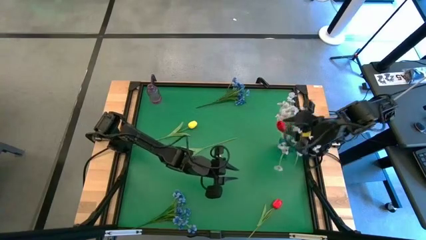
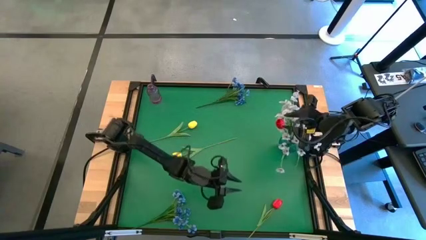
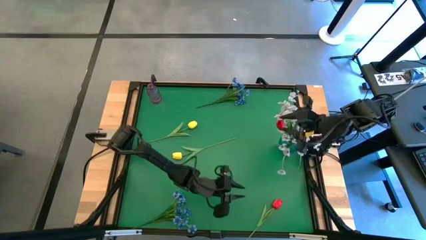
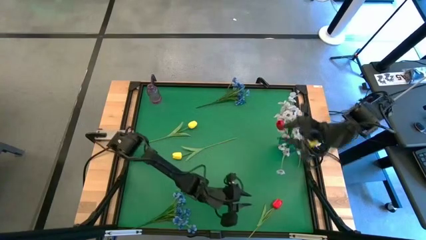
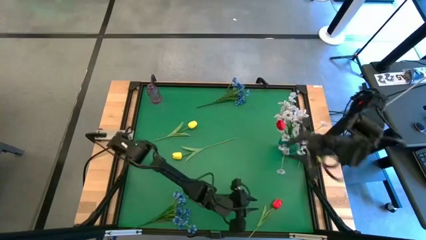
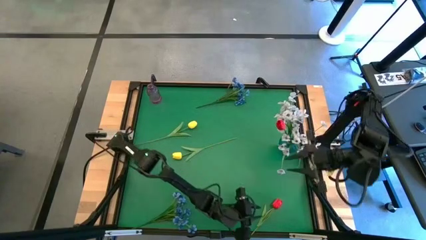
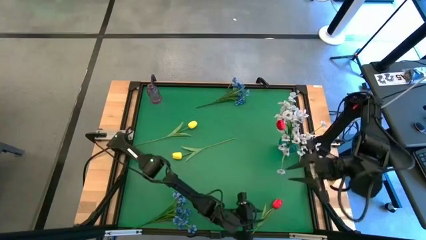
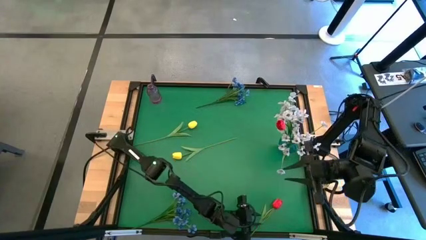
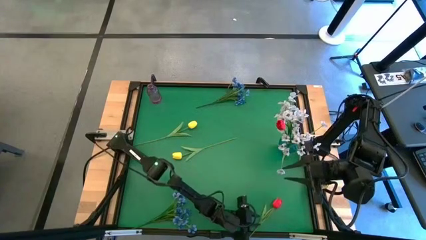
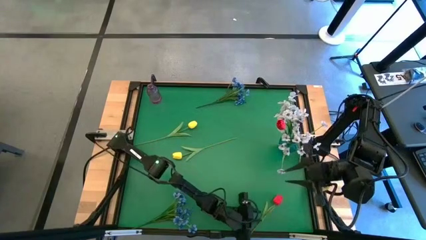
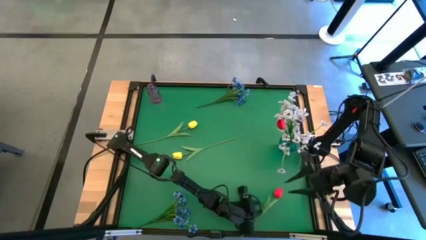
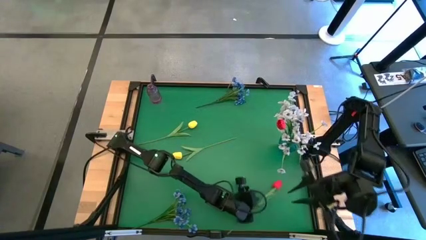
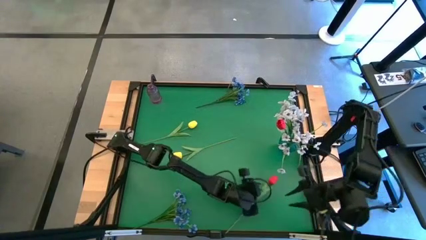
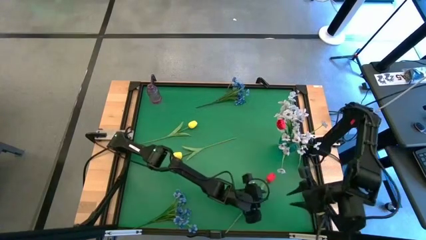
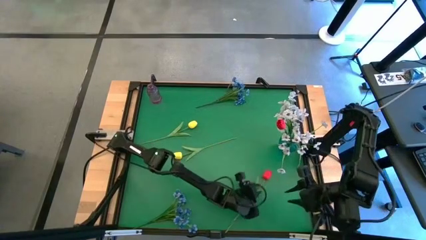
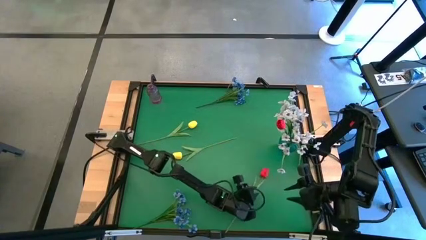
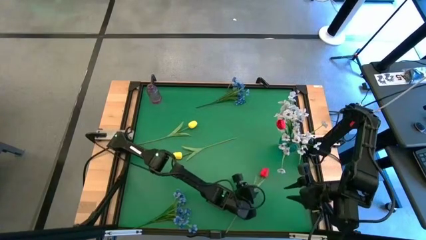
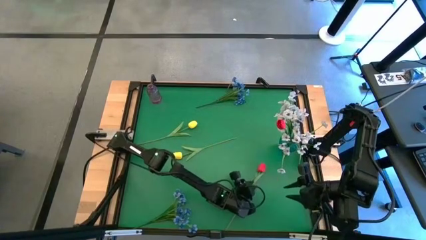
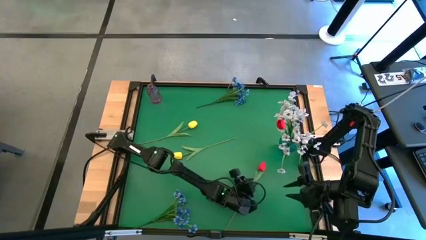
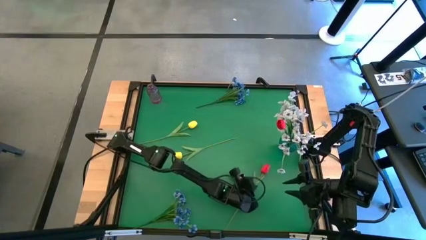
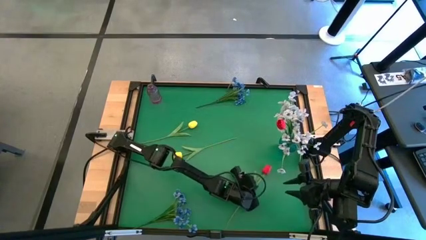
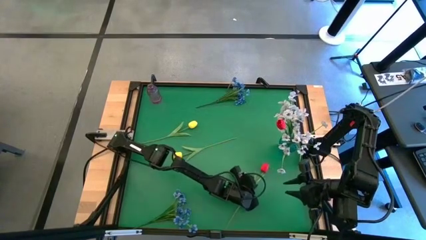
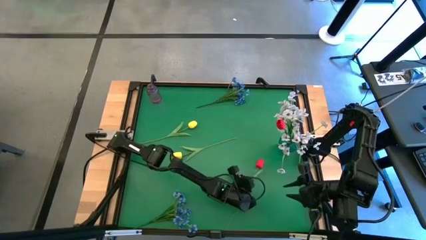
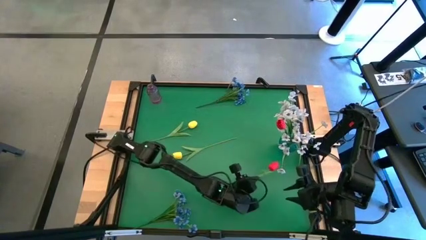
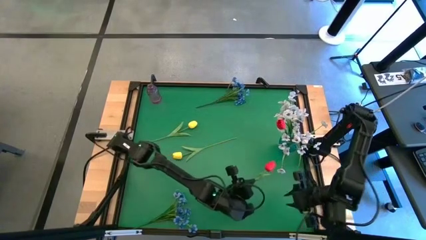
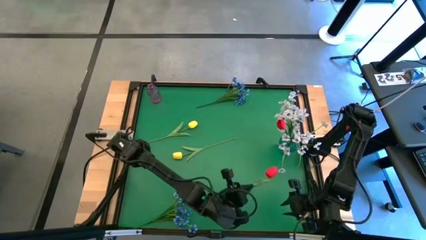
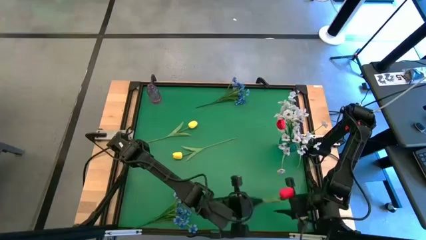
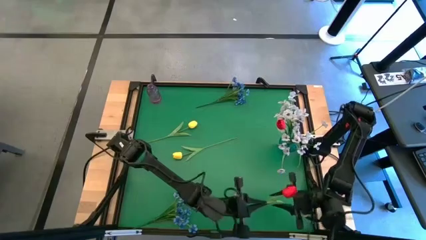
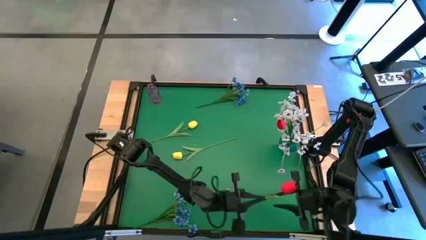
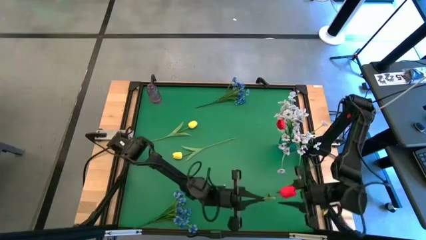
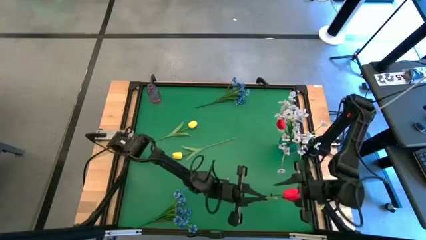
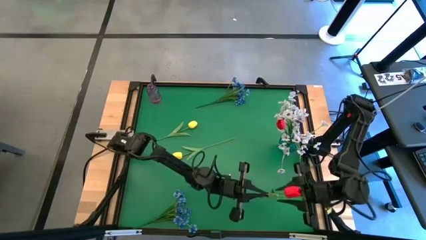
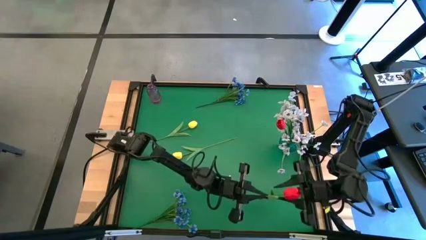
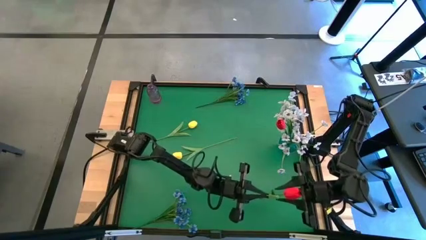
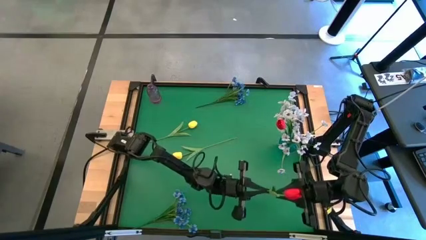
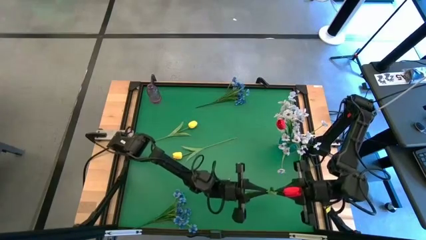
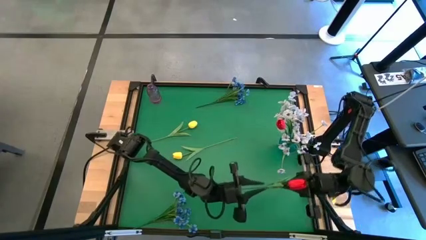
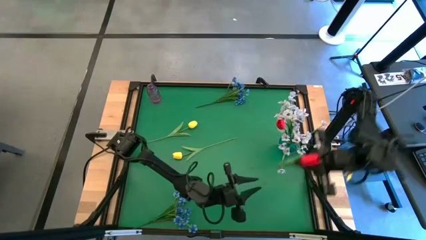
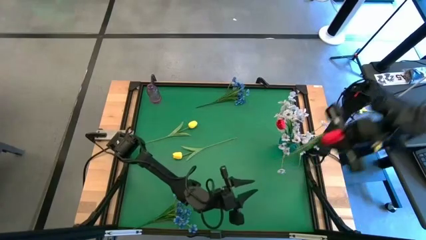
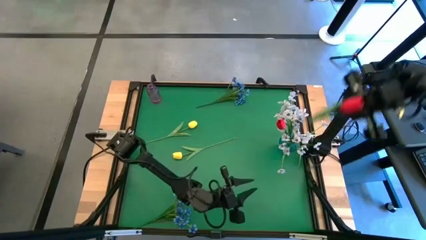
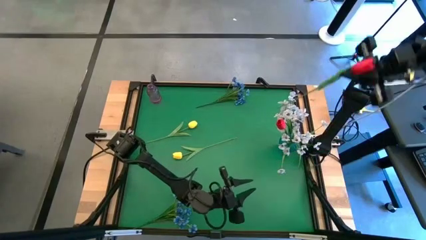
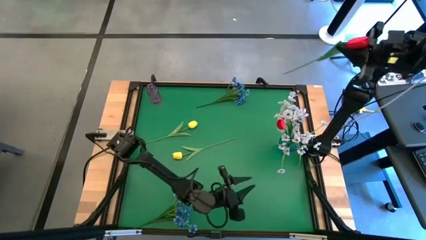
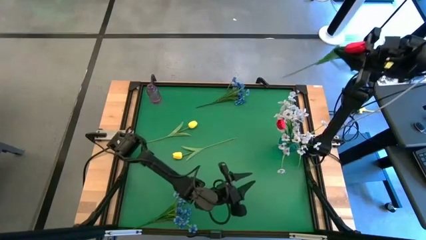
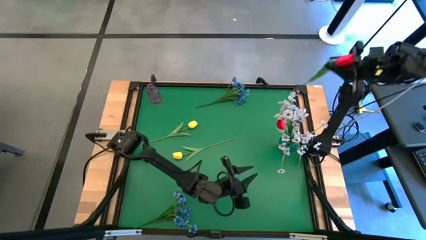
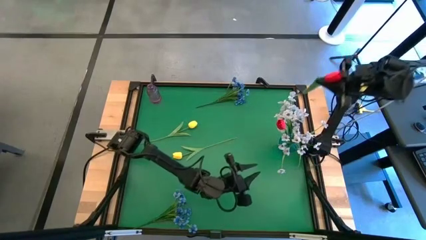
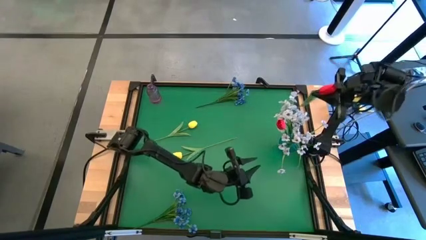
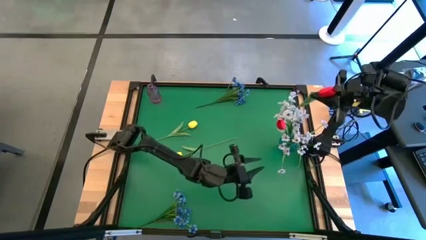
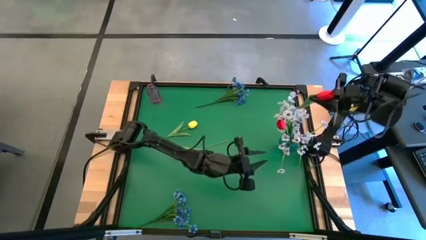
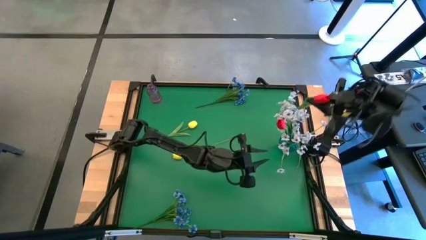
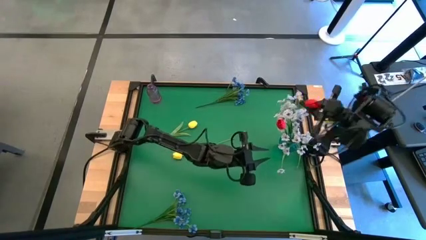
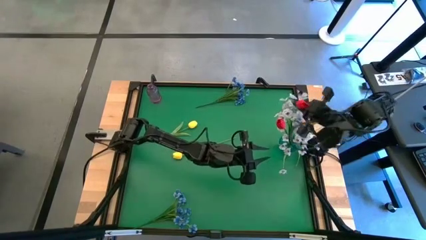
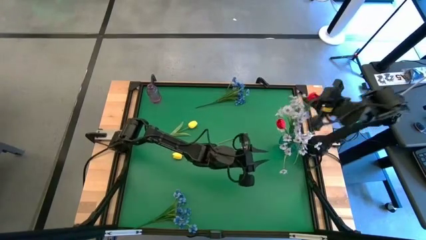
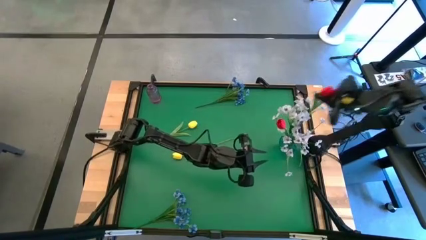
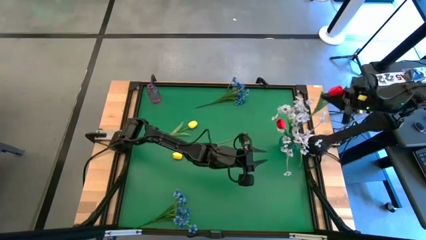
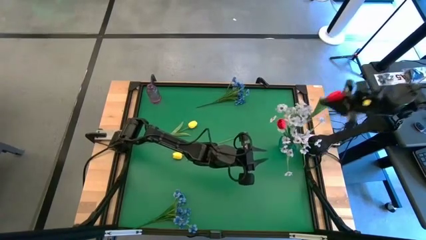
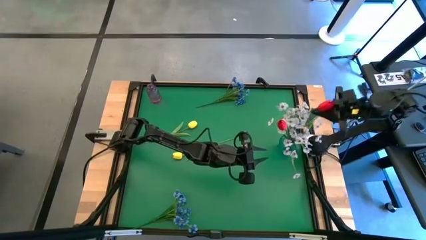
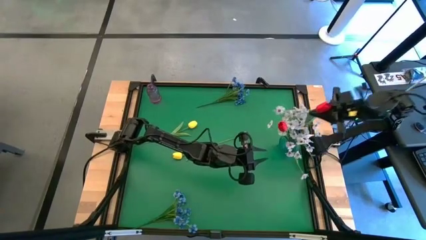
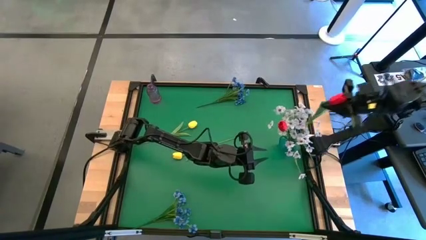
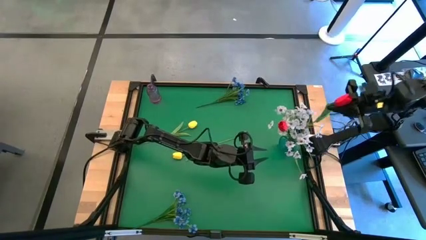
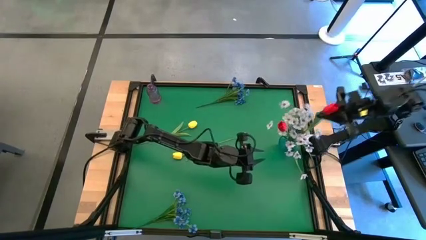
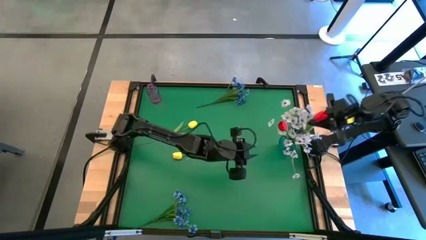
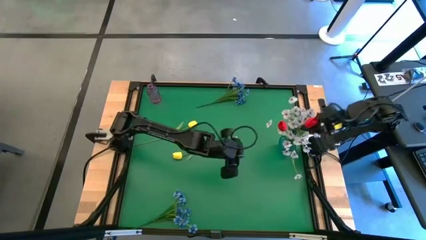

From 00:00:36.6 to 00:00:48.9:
Task: Sort flowers into vase by color
Put the red flower into the blue vase

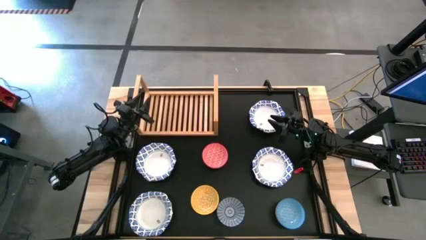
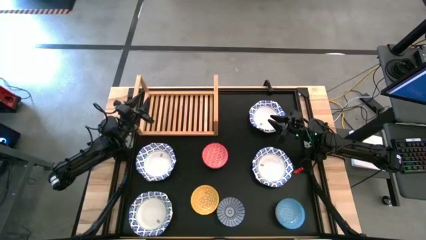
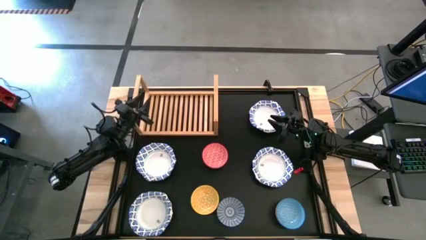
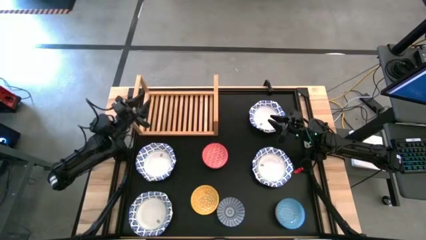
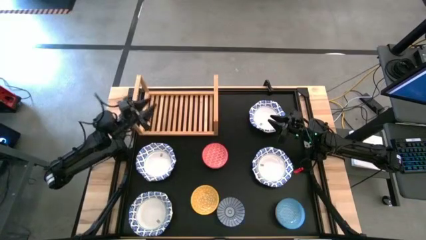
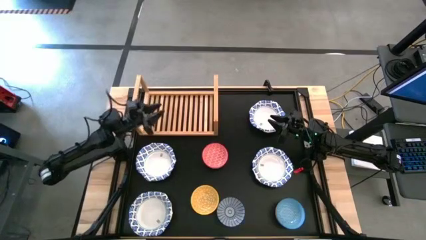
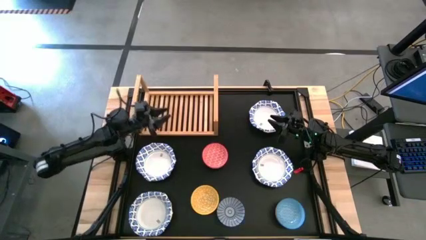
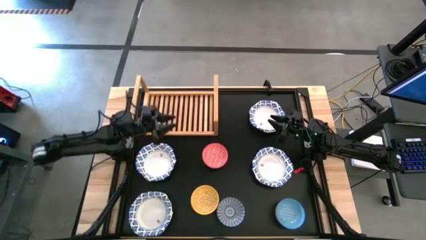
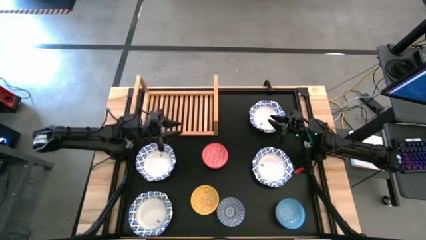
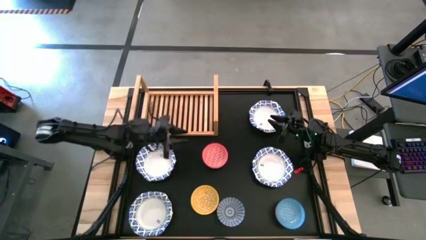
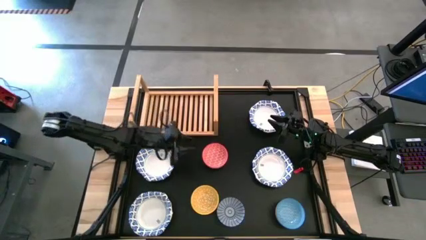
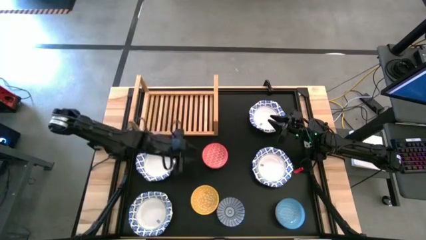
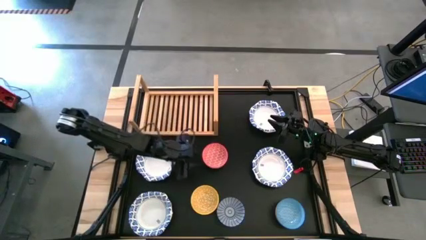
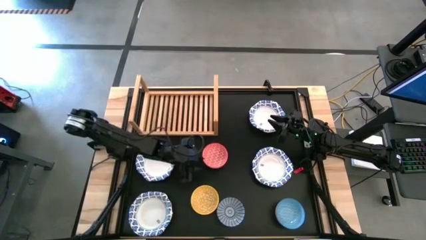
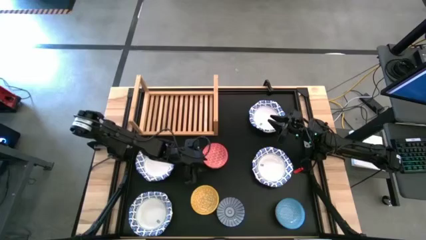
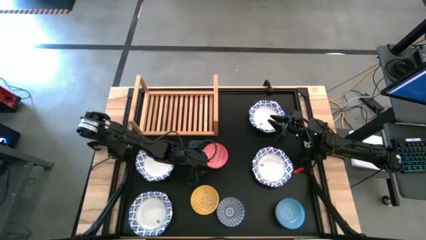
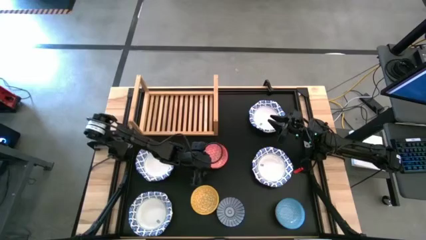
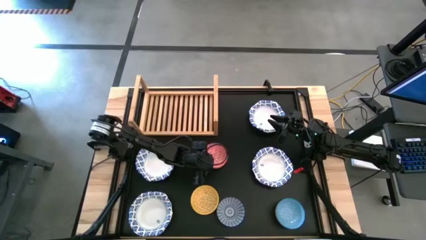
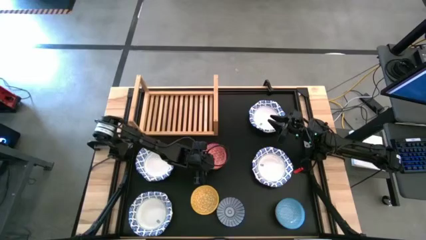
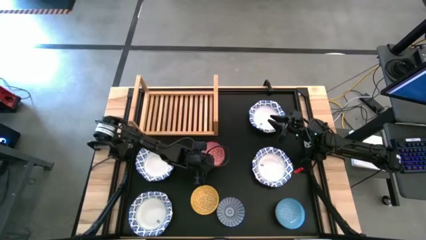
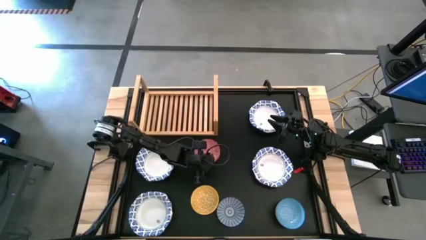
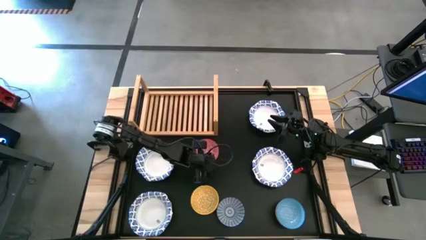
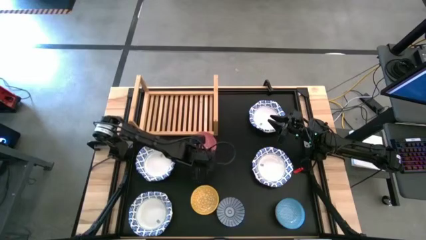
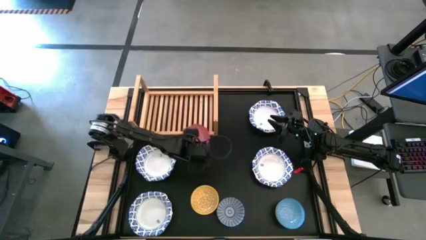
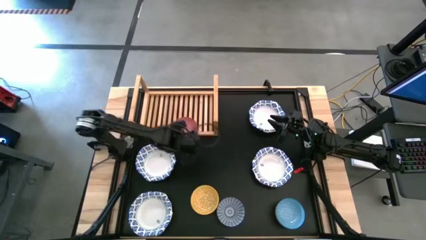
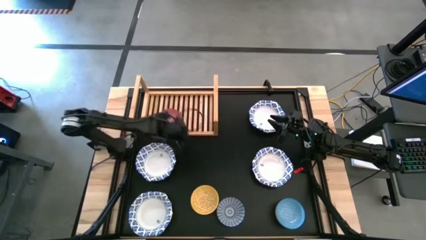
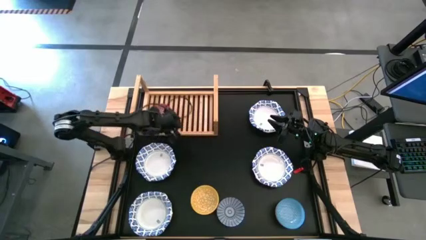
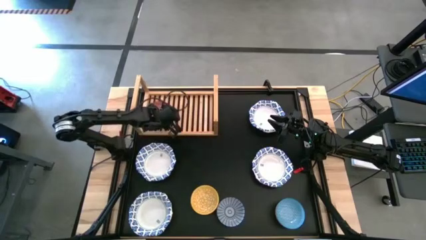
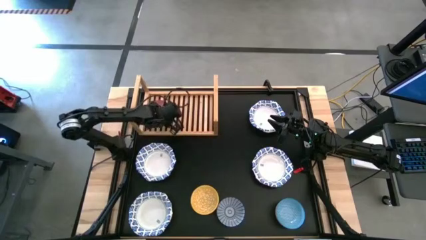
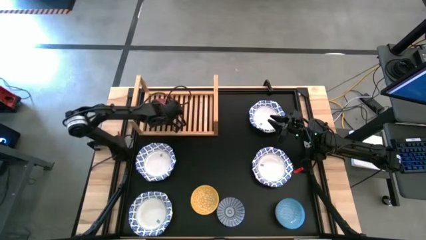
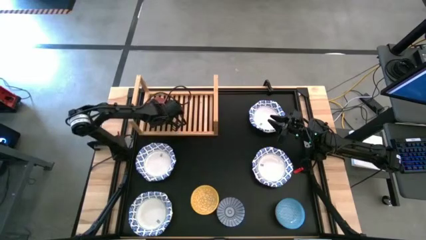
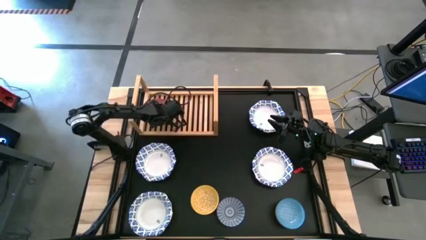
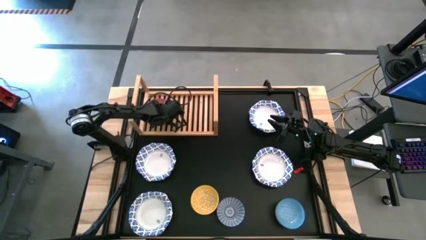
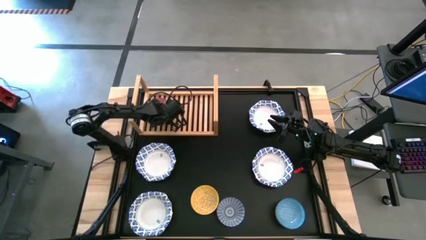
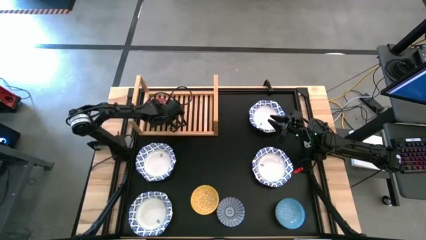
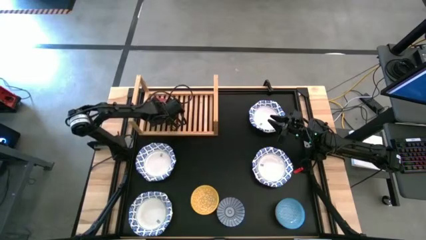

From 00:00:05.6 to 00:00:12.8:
Task: Place and stack bowls onto a shelf
Put the patterned red bowl on the shelf
